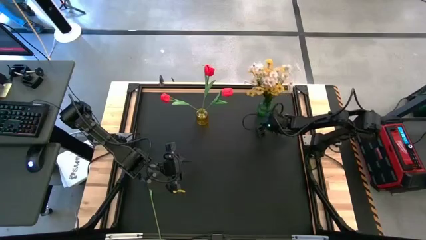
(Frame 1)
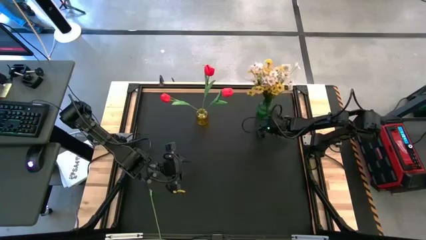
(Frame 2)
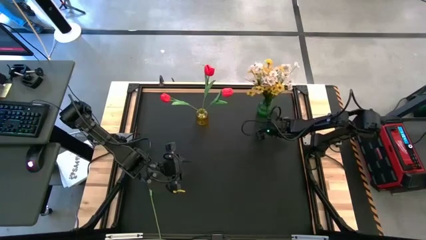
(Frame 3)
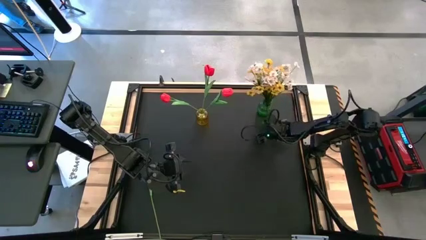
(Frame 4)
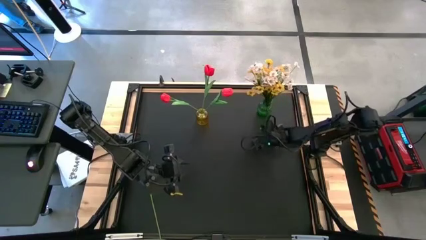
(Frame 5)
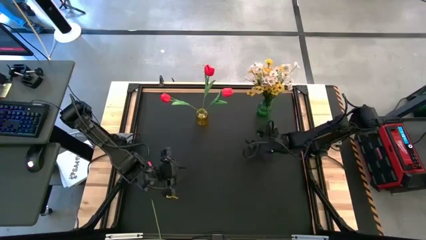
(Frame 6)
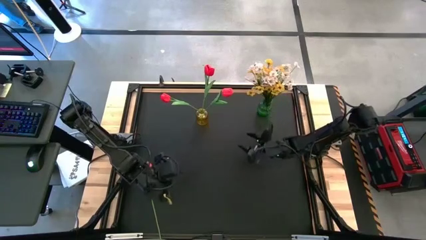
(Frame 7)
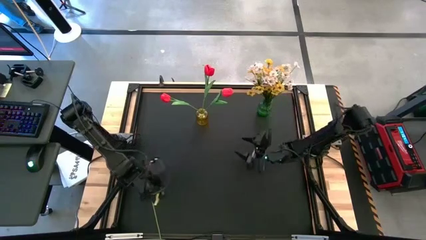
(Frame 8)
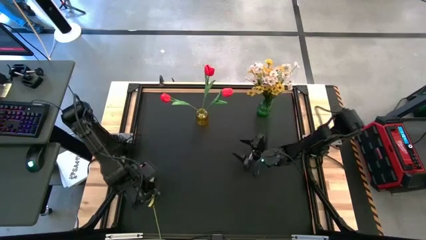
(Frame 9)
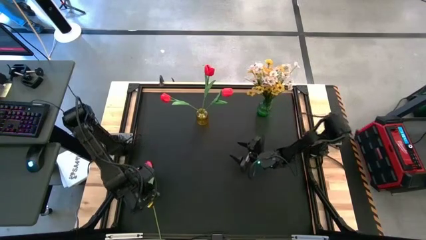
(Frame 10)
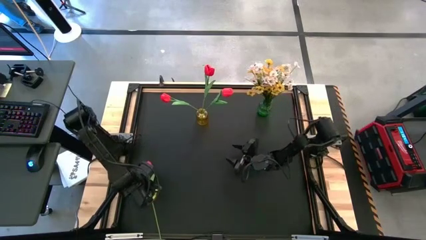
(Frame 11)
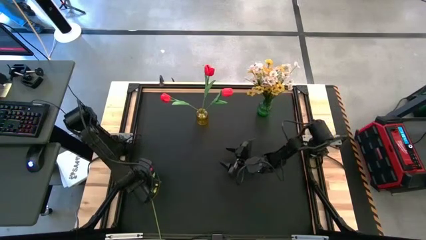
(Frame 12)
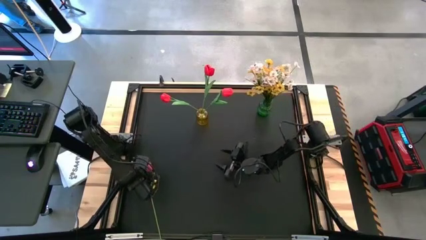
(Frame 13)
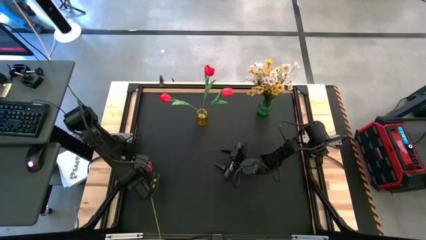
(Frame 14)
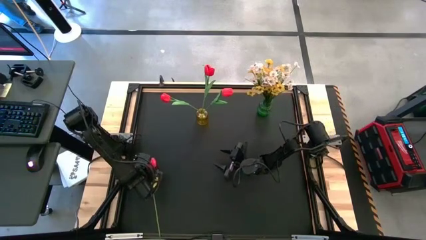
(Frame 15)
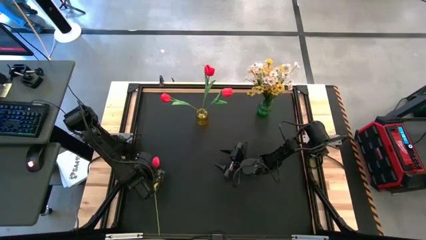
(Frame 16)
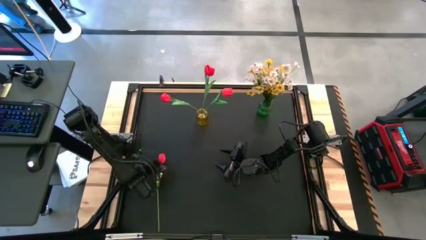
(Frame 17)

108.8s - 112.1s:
Task: Sort flowers into vase by color
Put the red tulip into the yellow vase

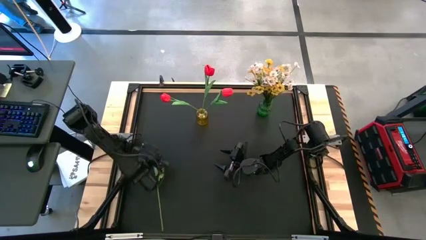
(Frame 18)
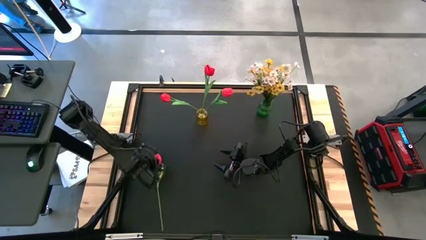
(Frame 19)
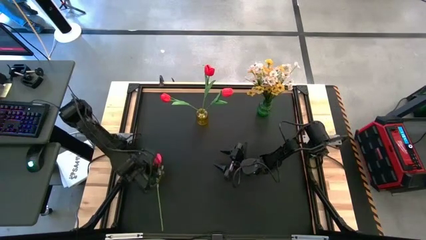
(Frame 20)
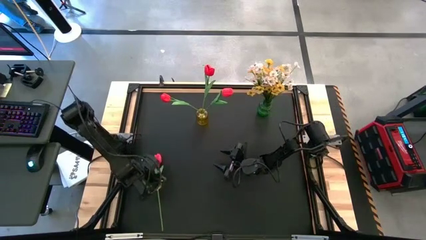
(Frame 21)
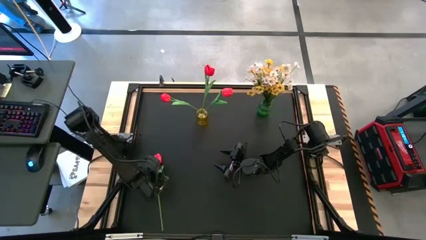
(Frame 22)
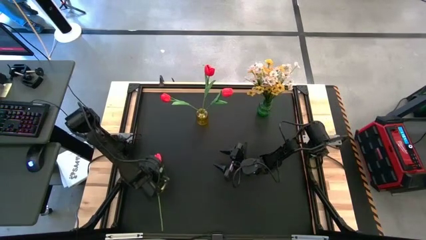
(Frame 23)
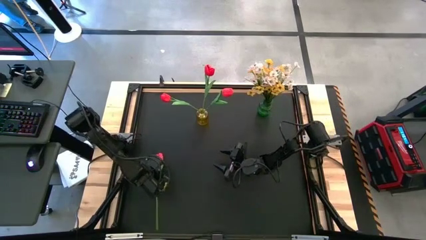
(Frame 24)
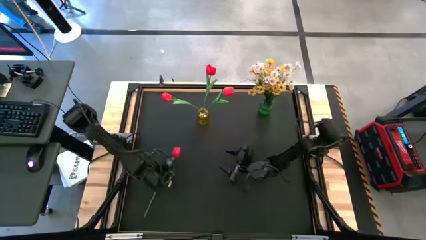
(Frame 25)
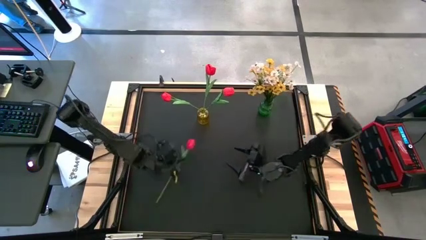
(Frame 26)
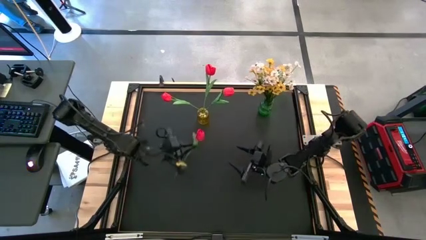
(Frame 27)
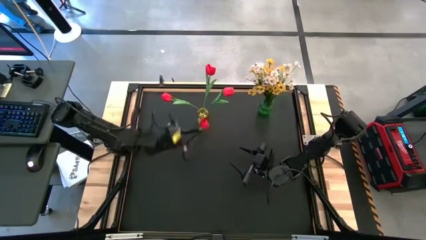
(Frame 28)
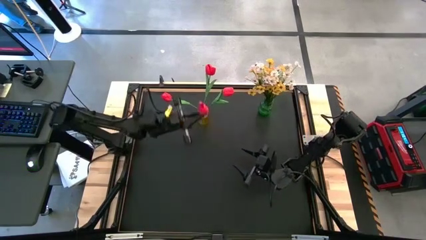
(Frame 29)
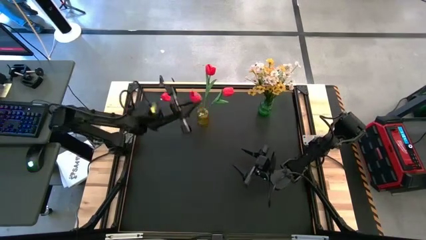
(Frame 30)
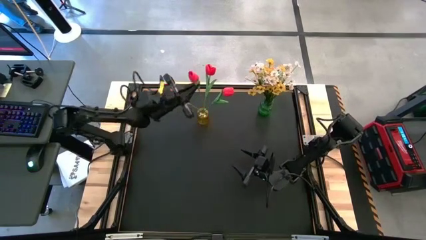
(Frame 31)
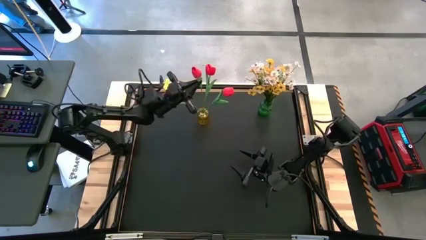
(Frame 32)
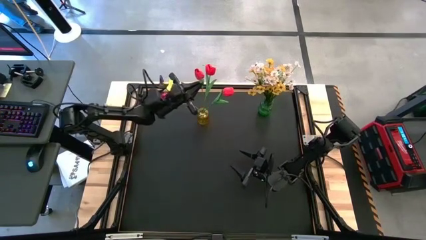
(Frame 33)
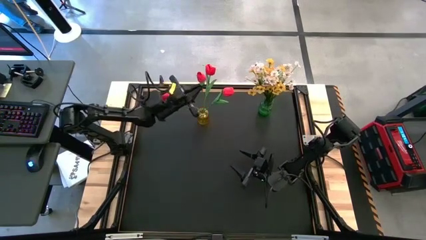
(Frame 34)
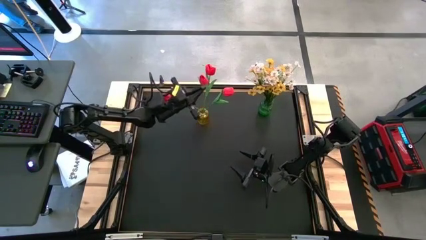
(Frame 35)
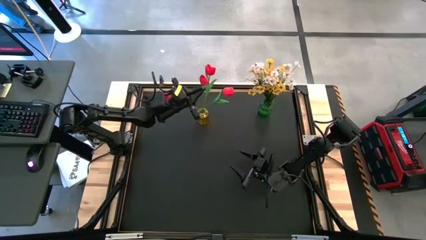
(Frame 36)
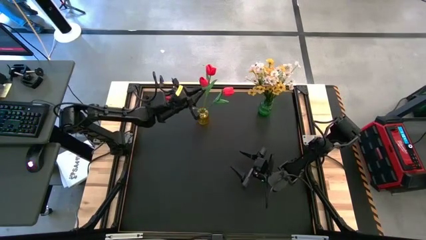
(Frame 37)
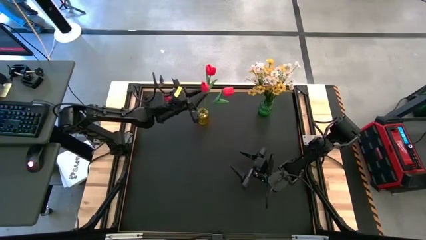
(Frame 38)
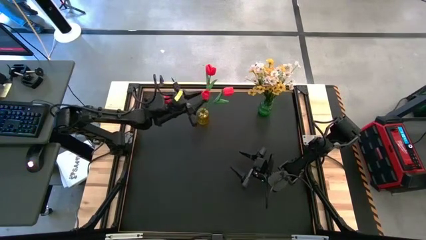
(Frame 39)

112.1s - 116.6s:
Put the red tulip into the yellow vase

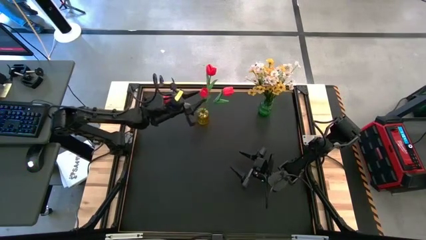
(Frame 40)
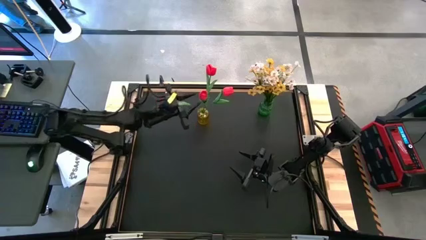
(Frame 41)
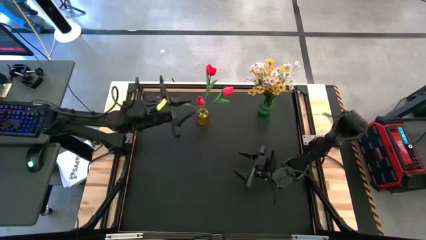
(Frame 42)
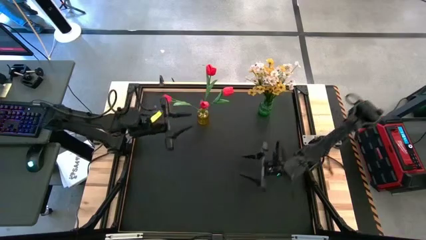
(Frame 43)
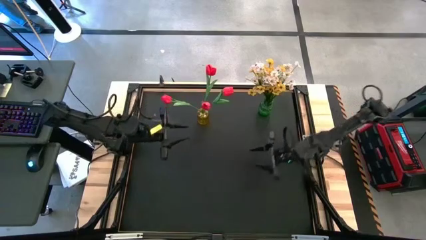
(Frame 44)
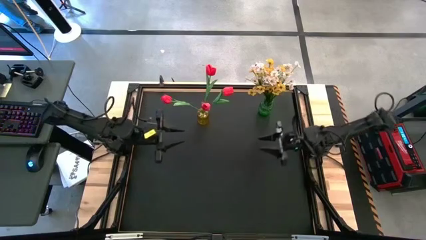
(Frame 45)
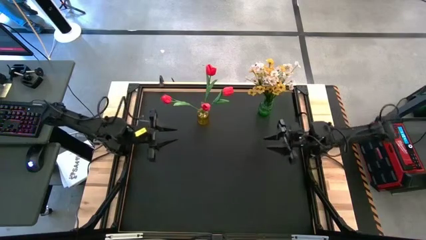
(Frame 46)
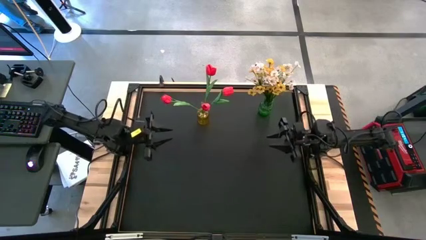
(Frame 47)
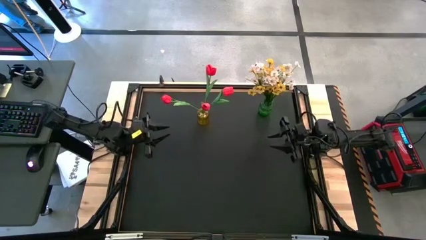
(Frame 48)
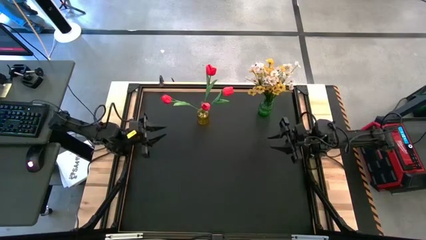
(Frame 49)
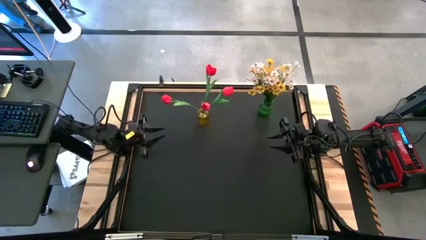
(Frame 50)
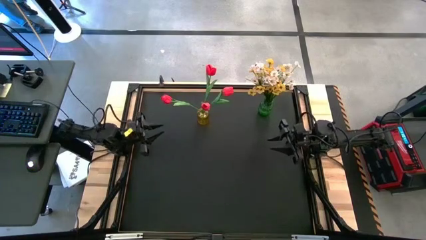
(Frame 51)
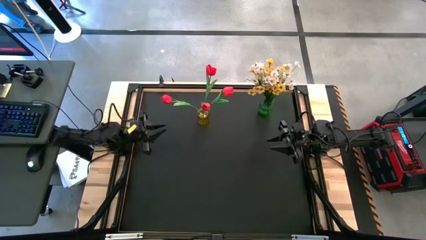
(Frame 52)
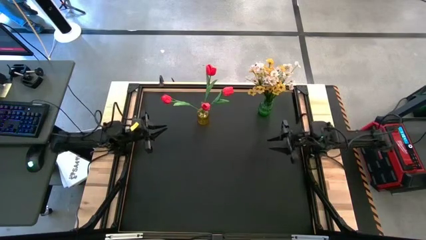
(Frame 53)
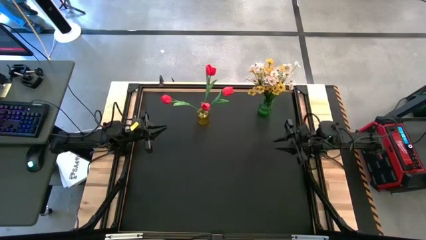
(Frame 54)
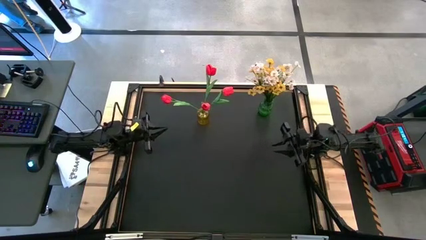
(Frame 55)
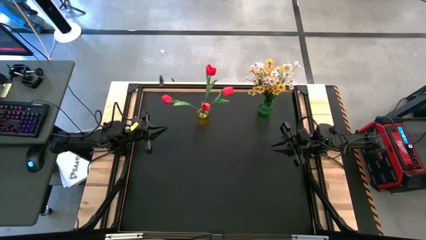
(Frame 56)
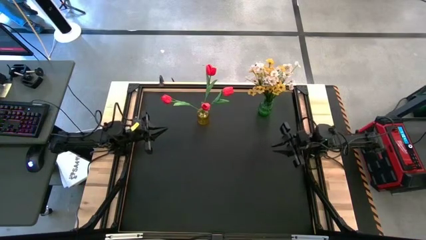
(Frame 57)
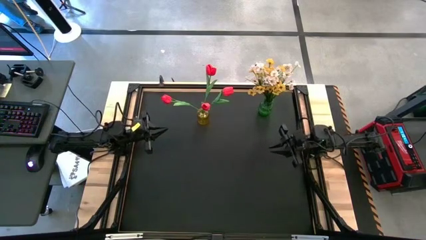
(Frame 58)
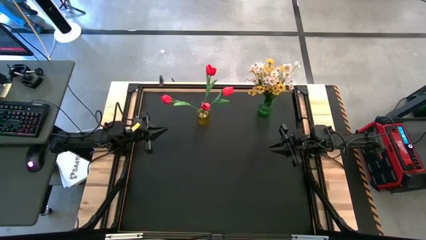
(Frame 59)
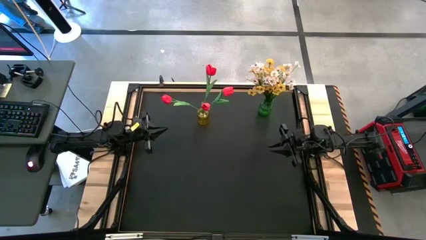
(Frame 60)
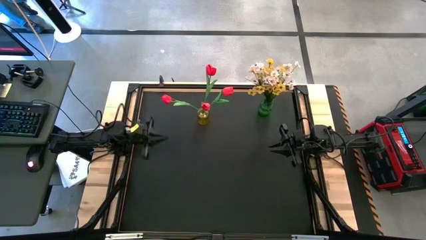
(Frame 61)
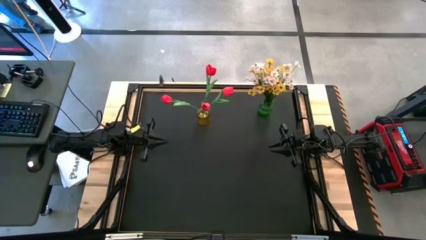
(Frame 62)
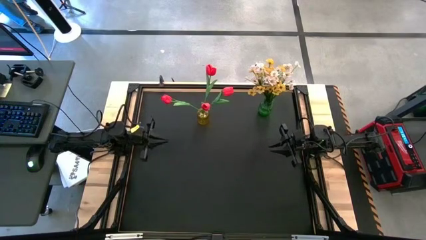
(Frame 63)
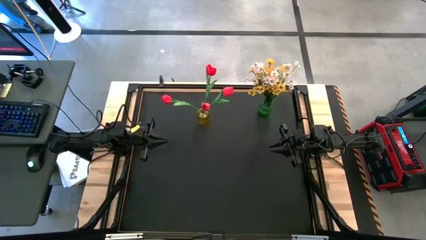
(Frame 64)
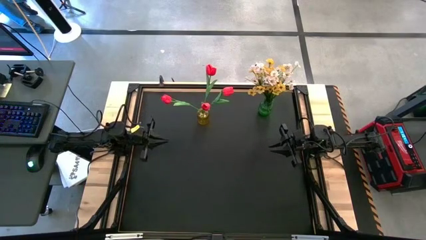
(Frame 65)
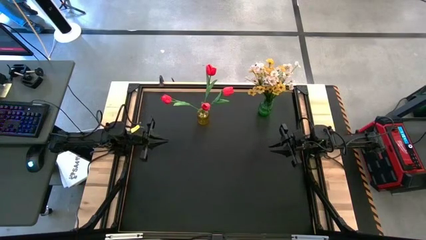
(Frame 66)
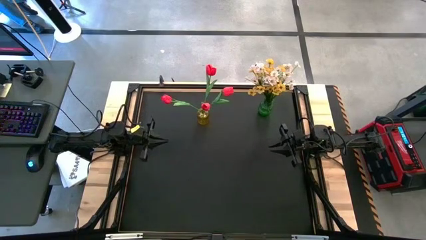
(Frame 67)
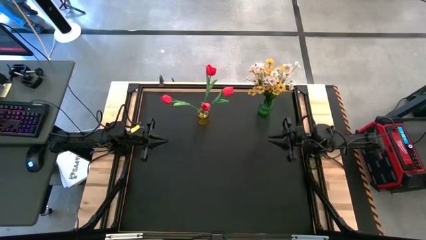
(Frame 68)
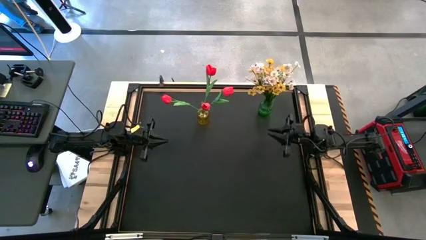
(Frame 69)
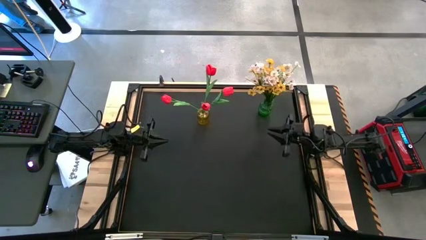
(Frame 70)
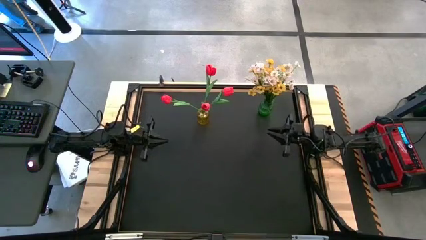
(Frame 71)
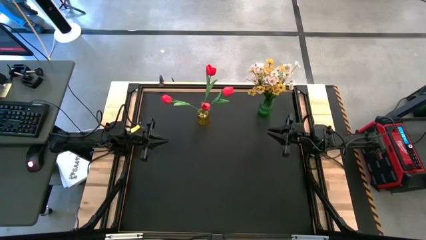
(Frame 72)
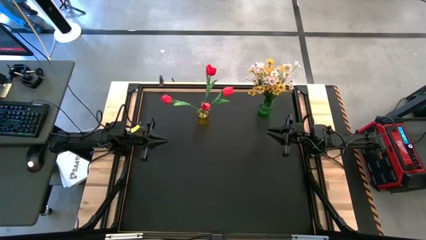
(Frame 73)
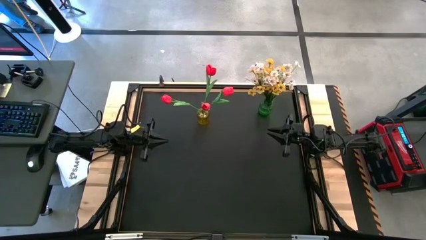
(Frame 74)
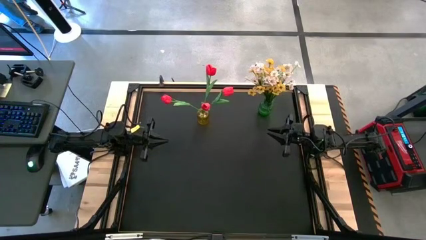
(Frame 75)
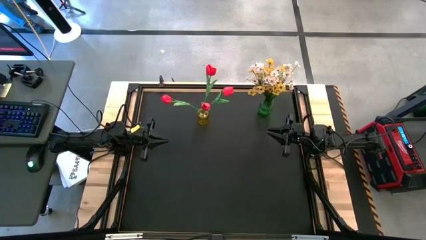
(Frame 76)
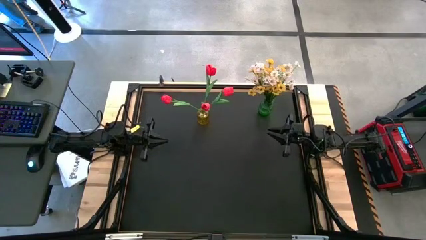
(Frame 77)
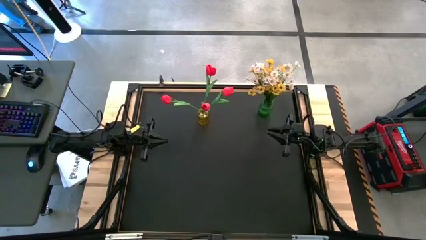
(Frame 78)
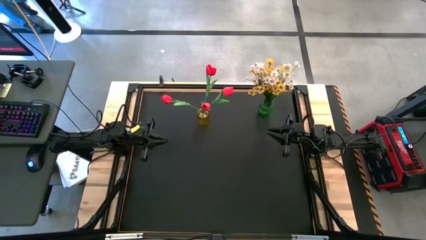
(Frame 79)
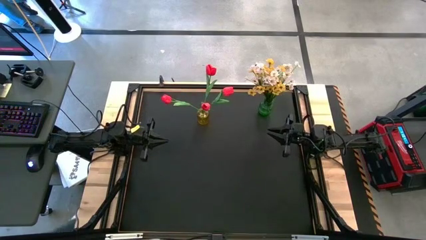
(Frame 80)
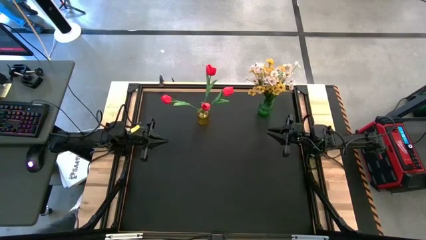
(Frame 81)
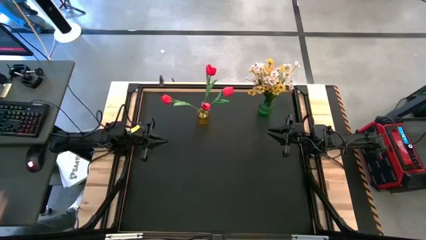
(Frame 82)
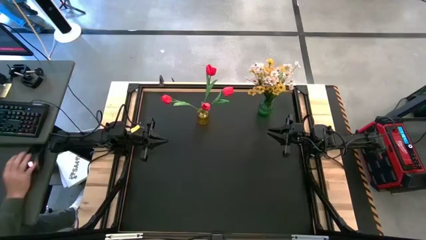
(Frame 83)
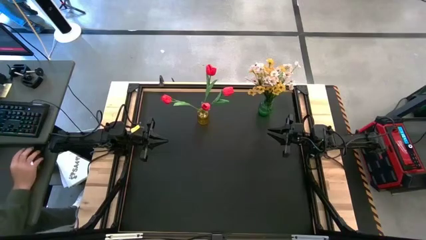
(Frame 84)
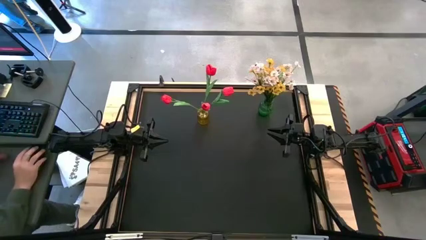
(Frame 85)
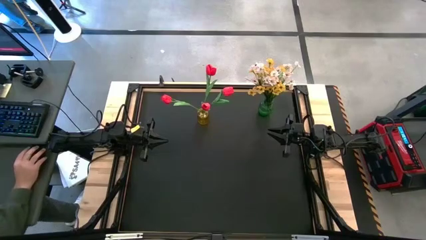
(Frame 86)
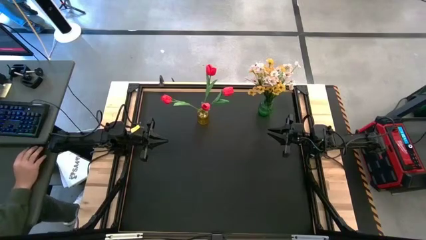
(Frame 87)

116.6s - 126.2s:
Return to Home Position
